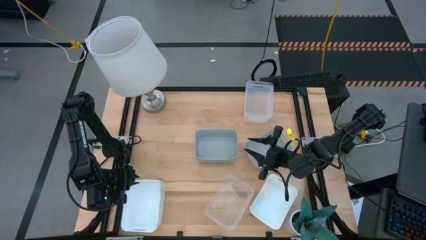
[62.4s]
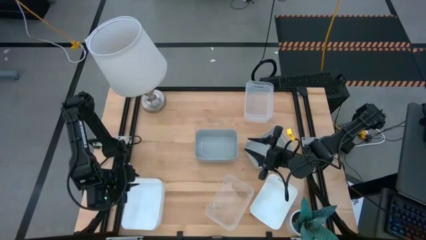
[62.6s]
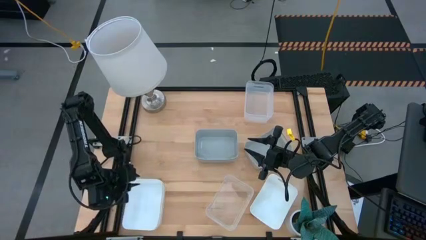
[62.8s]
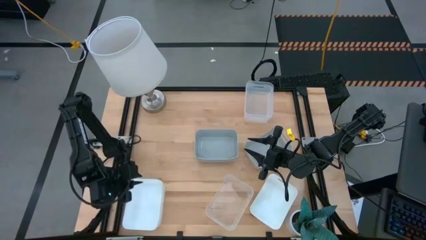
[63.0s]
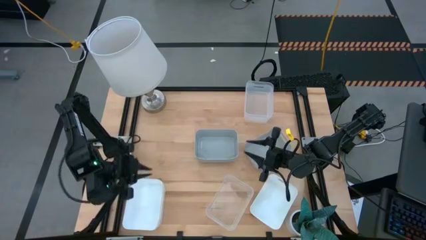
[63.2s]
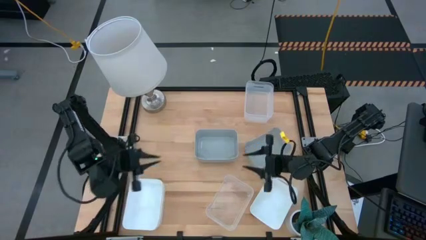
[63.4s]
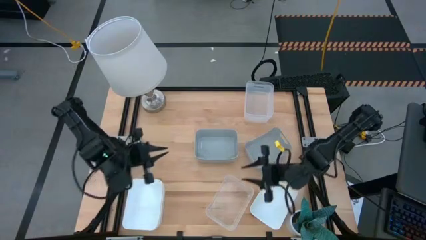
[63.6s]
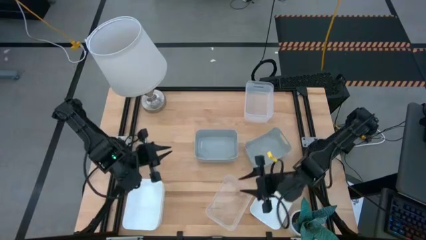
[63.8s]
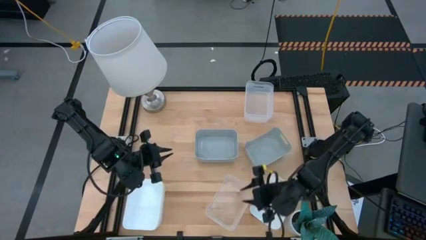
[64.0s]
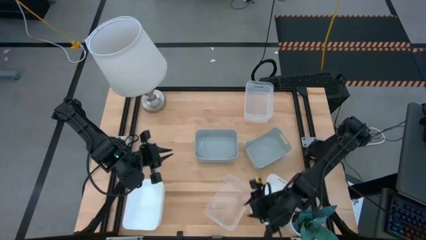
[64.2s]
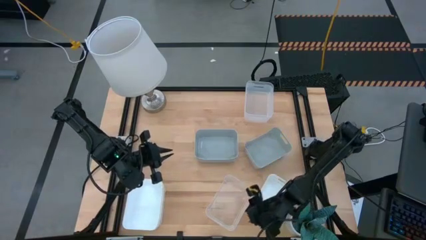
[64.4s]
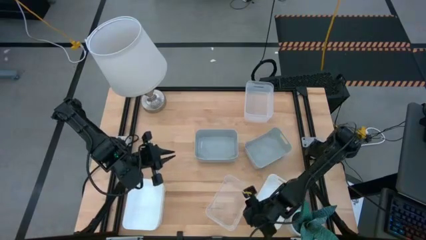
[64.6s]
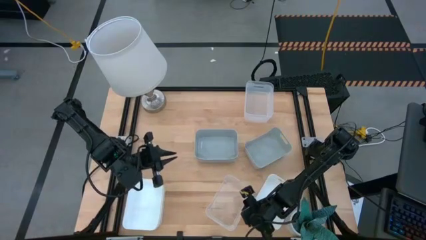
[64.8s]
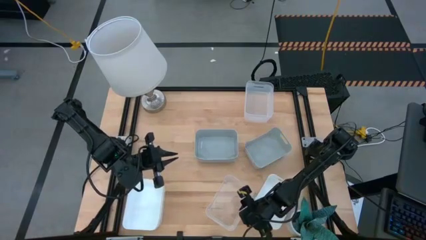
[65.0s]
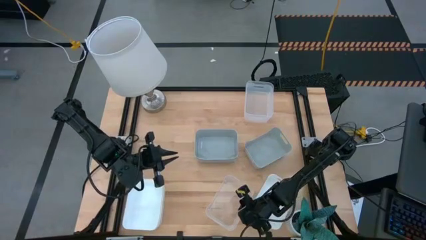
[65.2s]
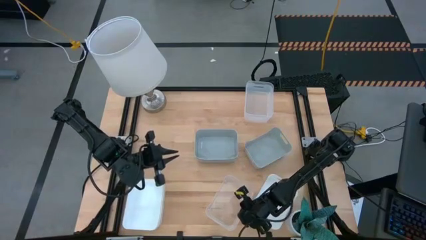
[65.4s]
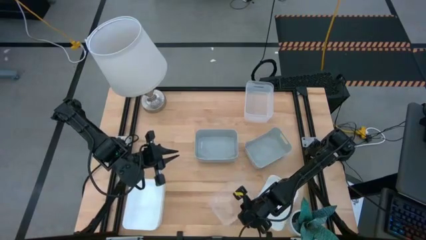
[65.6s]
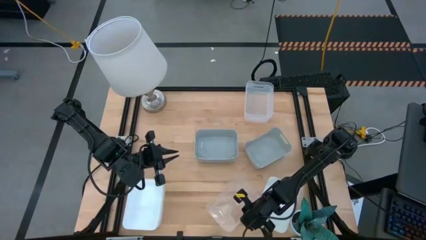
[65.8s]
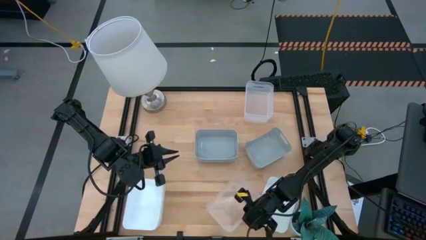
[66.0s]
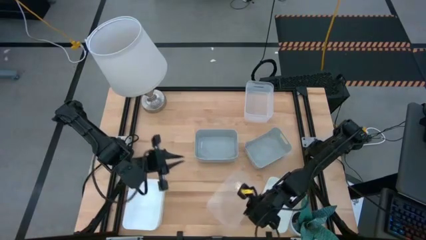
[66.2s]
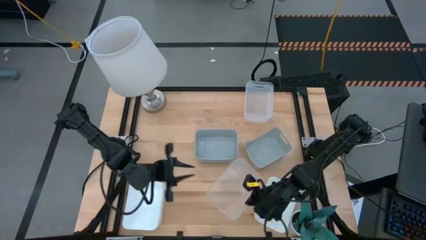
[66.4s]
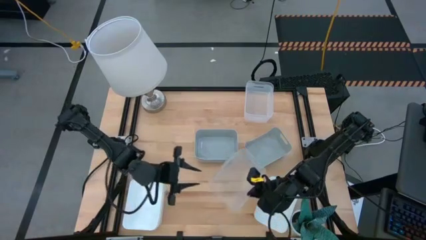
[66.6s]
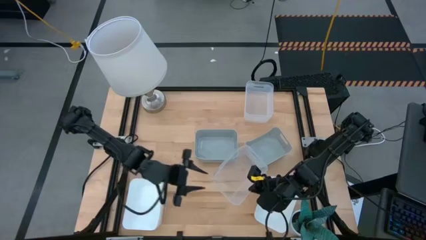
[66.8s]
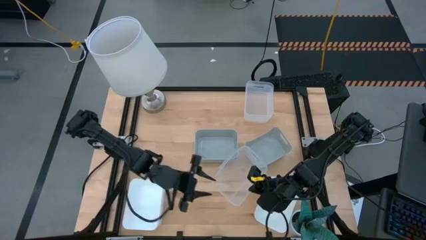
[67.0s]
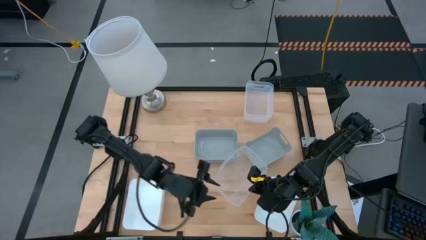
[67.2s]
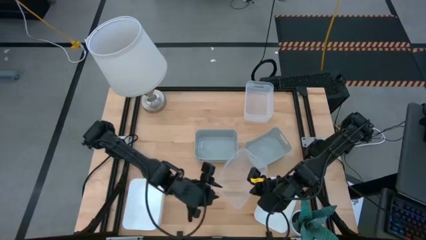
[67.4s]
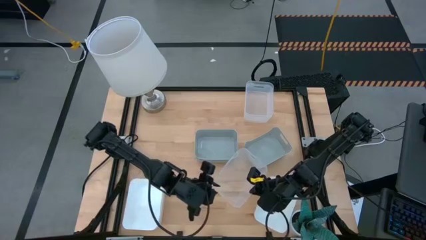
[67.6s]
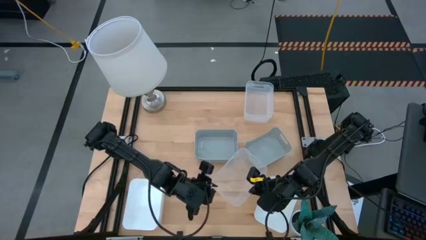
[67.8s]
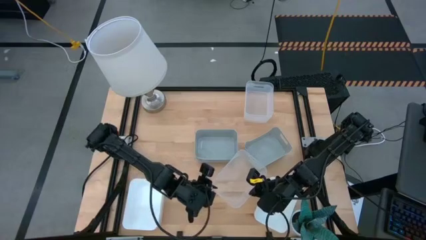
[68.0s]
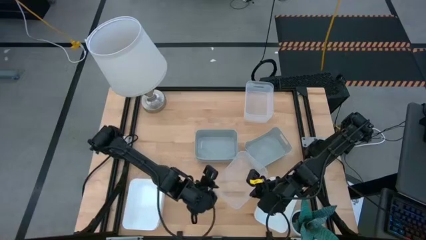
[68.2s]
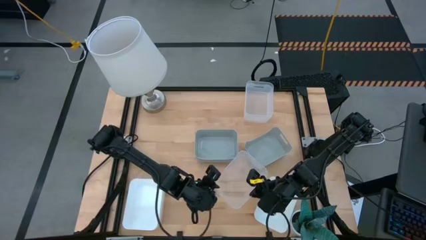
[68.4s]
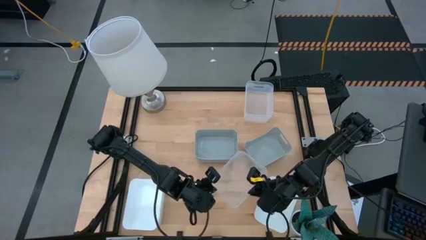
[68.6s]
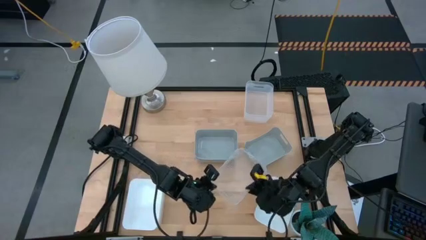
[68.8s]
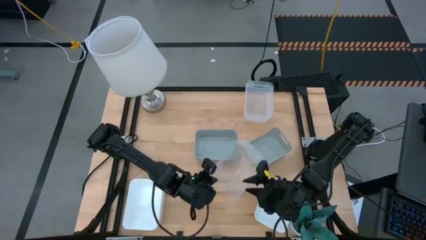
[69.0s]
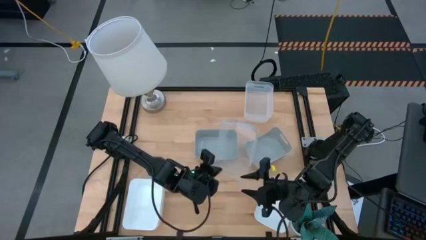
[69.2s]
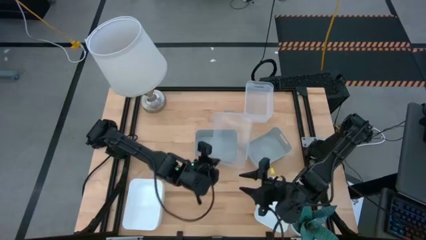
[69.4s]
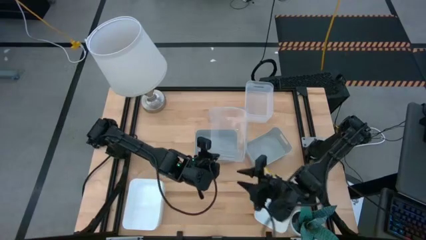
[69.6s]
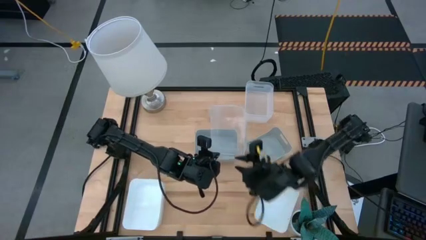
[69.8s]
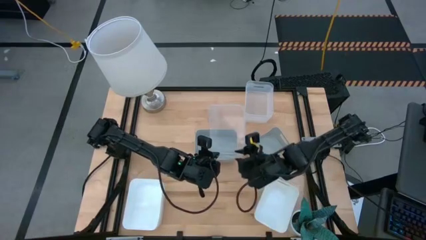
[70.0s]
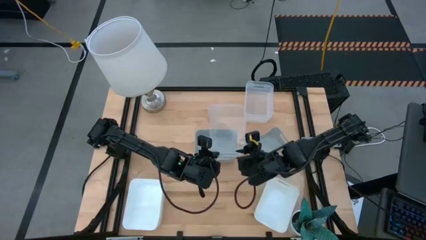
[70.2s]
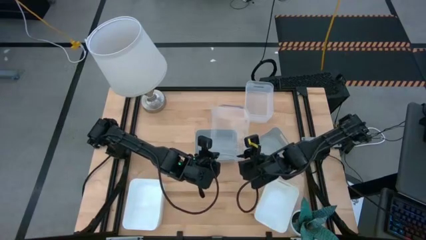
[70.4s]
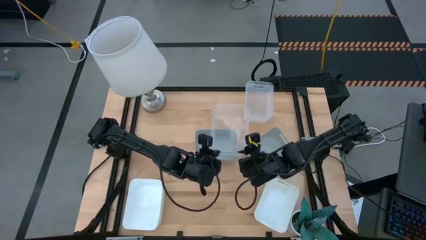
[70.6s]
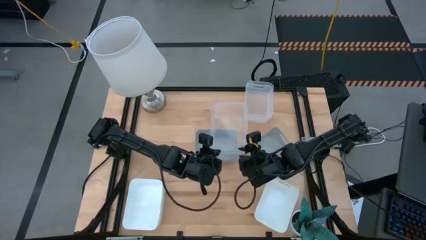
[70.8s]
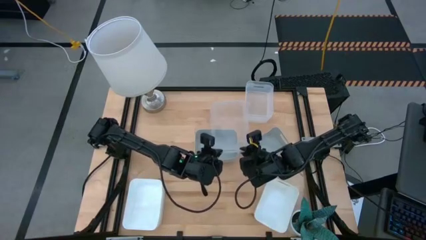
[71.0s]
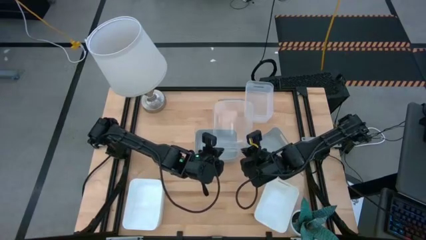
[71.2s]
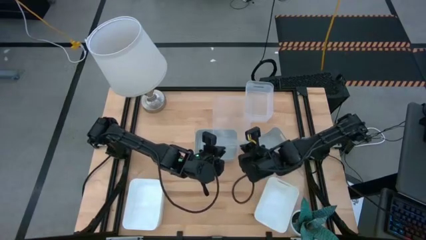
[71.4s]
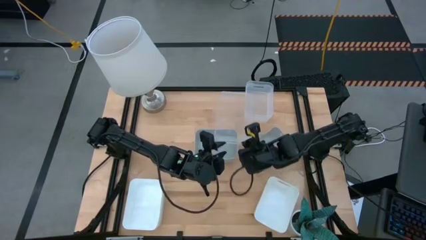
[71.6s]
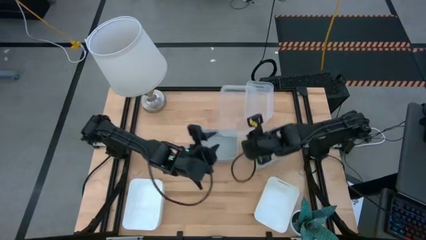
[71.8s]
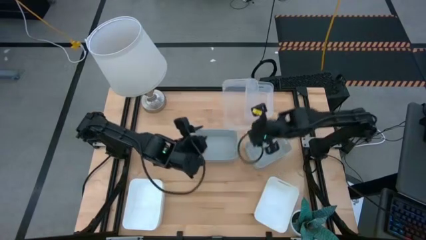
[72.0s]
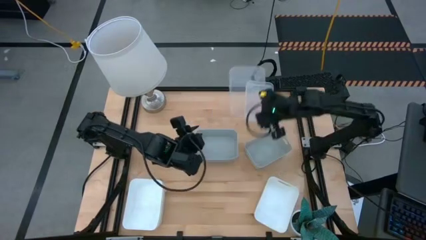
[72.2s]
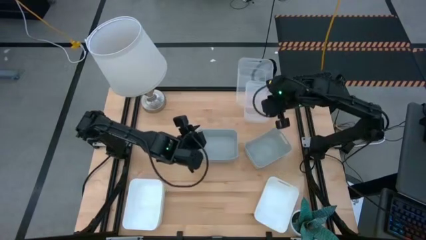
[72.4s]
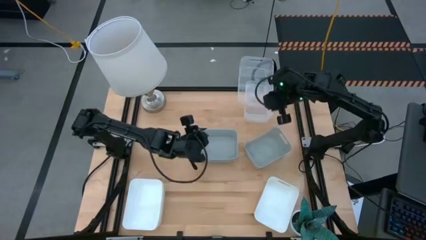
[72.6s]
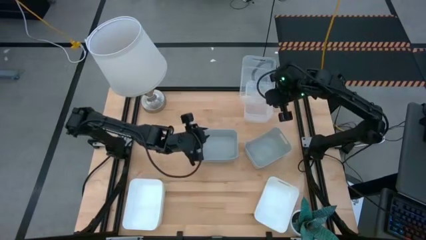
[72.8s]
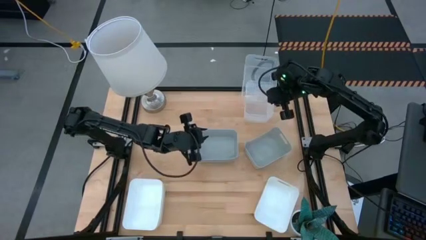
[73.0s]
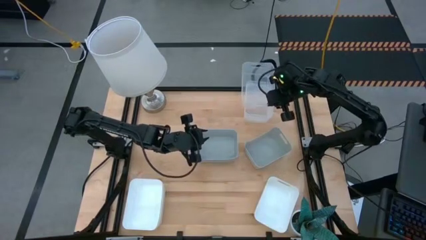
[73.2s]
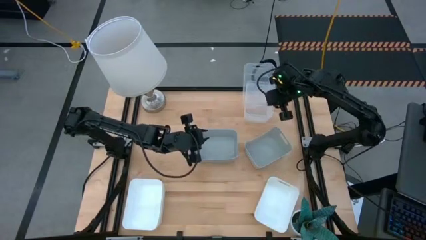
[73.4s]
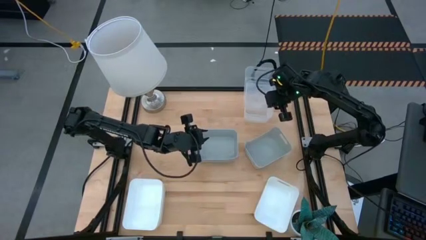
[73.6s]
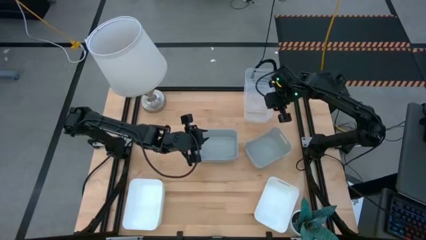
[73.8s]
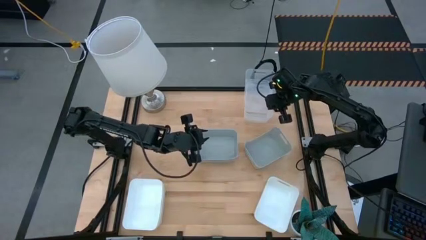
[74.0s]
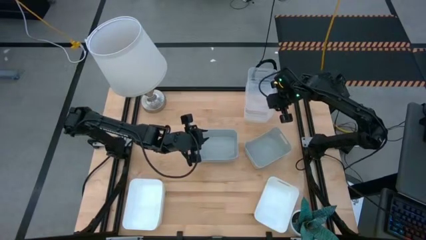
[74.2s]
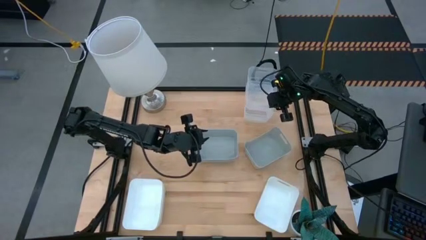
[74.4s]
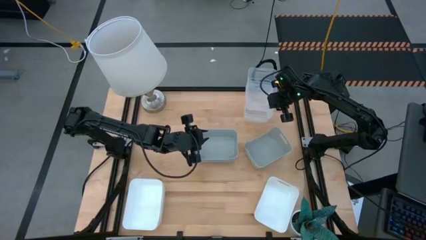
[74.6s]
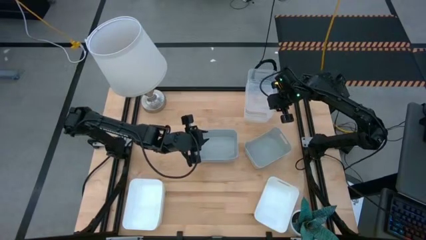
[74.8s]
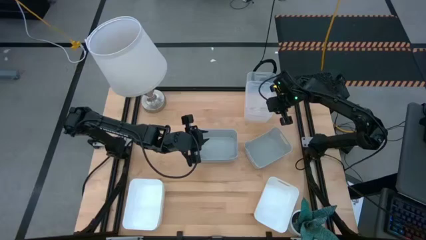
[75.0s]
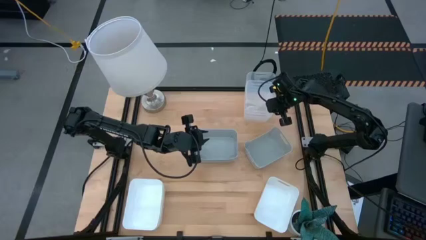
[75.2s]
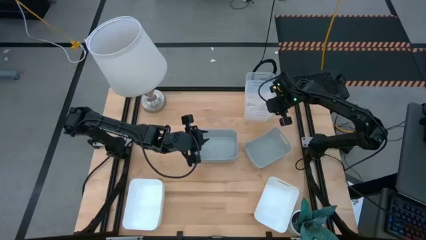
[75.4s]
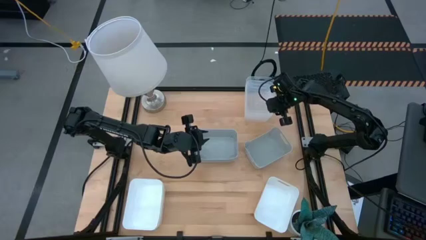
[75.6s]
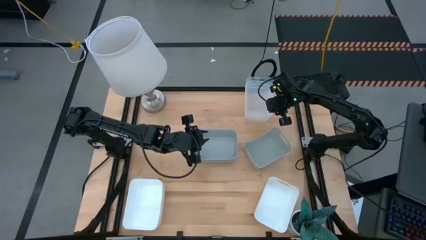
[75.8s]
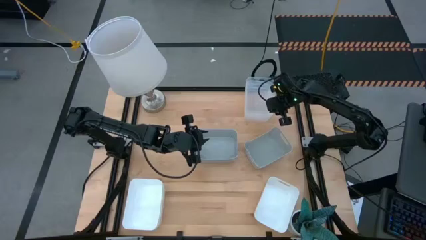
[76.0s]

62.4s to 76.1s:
Stack the transparent bin on the stacked transparent bins
